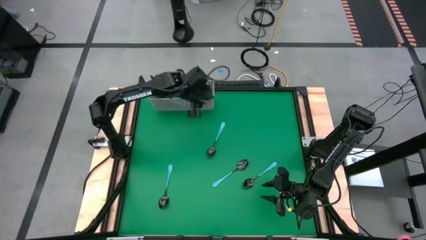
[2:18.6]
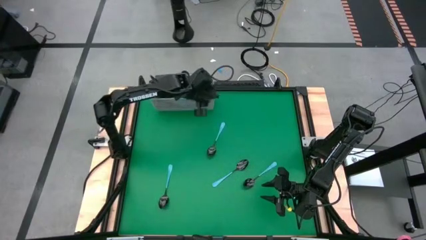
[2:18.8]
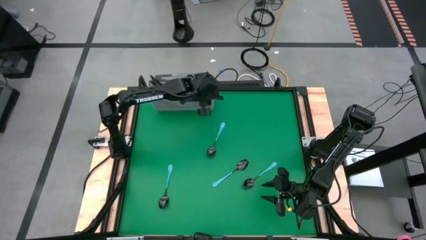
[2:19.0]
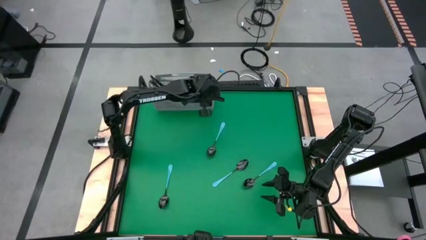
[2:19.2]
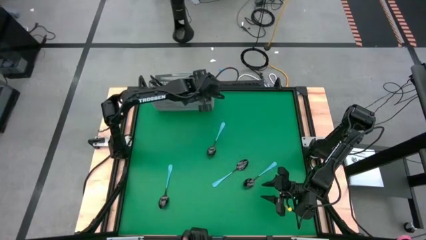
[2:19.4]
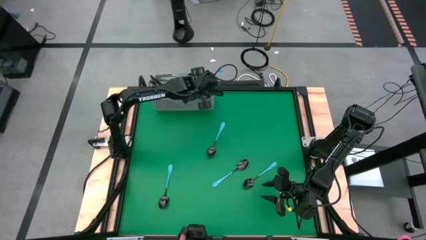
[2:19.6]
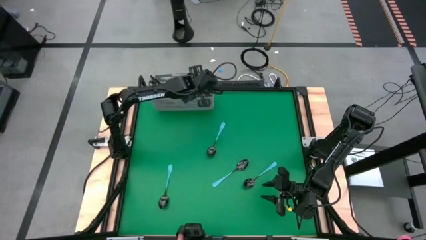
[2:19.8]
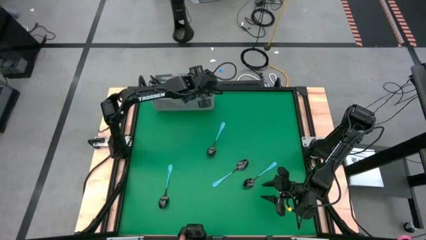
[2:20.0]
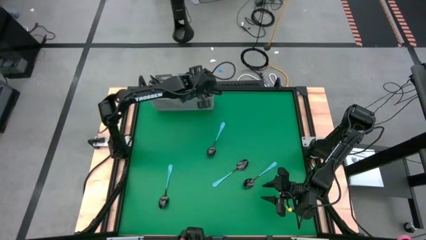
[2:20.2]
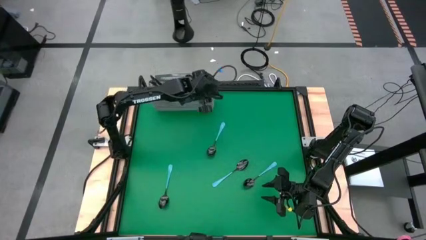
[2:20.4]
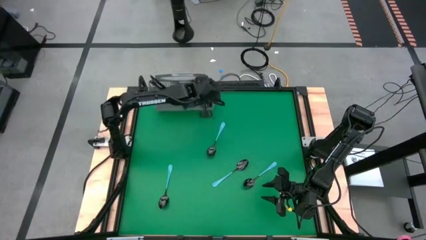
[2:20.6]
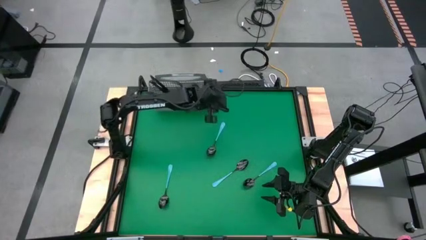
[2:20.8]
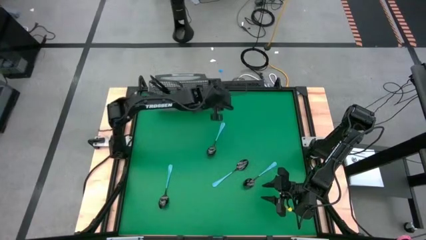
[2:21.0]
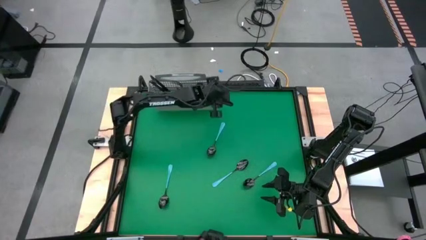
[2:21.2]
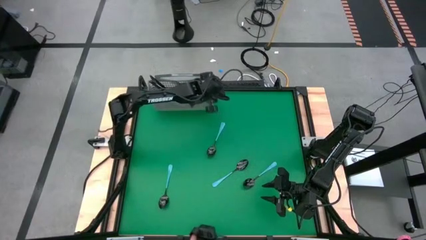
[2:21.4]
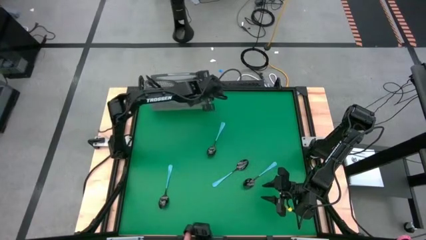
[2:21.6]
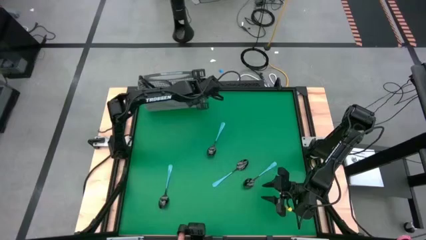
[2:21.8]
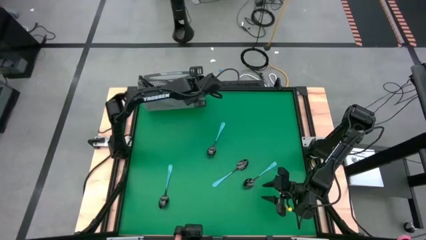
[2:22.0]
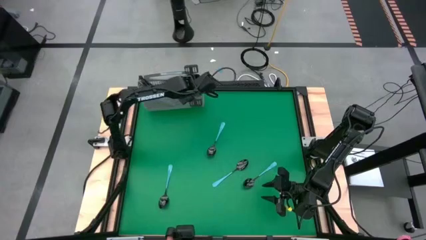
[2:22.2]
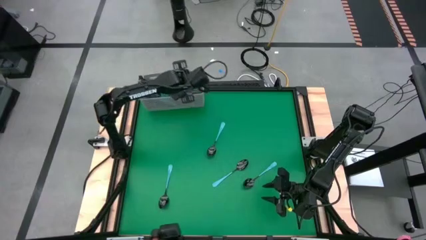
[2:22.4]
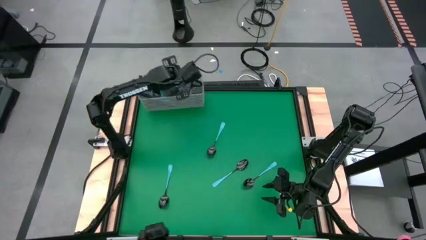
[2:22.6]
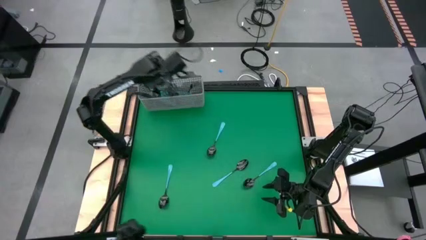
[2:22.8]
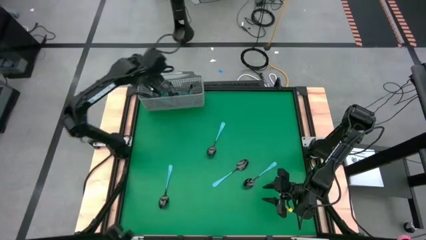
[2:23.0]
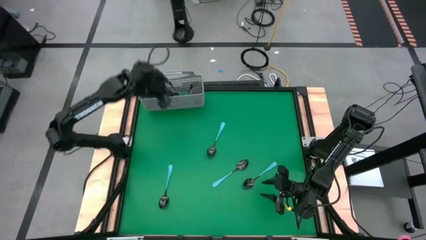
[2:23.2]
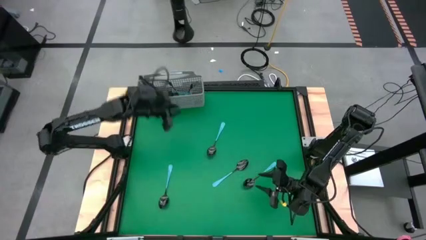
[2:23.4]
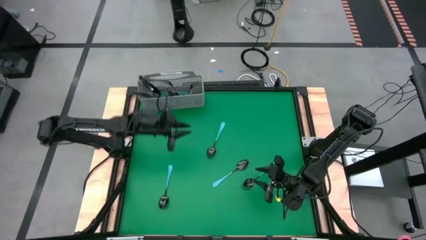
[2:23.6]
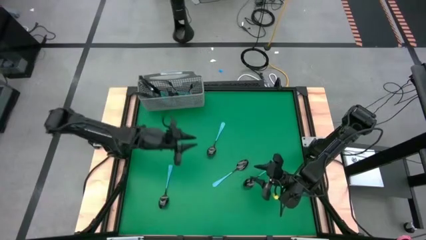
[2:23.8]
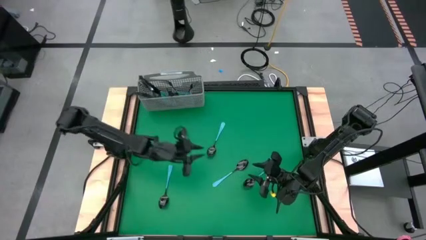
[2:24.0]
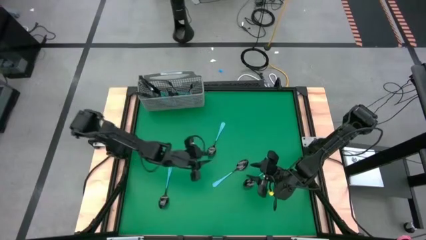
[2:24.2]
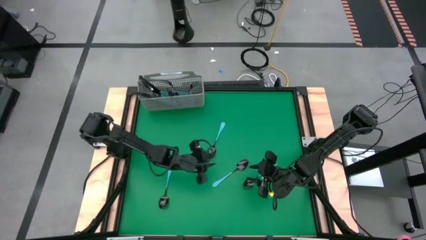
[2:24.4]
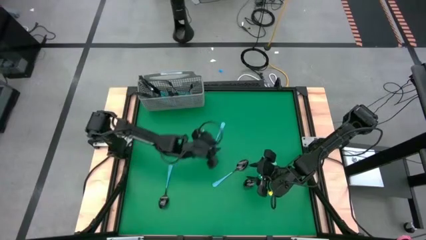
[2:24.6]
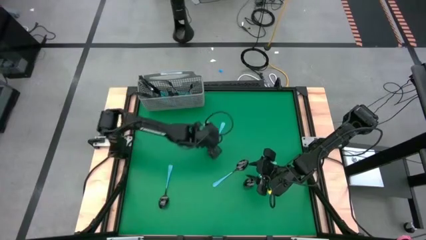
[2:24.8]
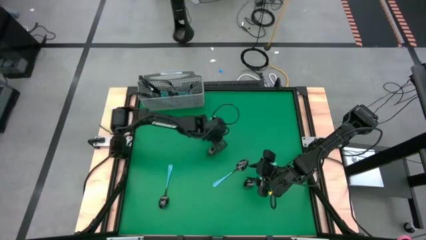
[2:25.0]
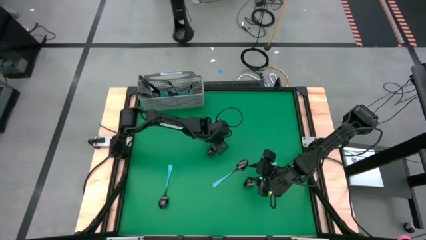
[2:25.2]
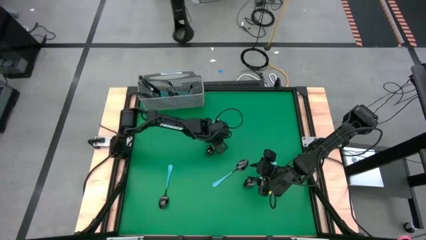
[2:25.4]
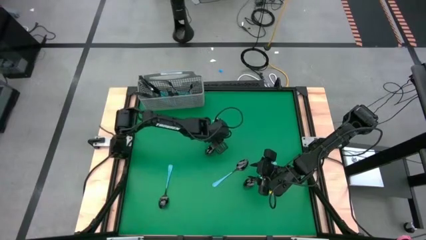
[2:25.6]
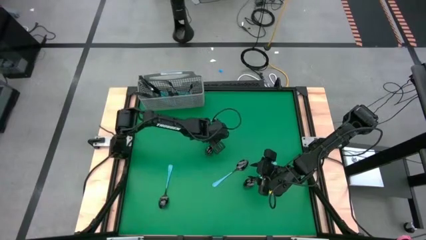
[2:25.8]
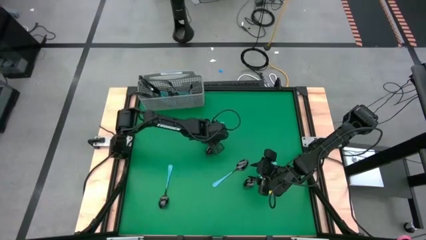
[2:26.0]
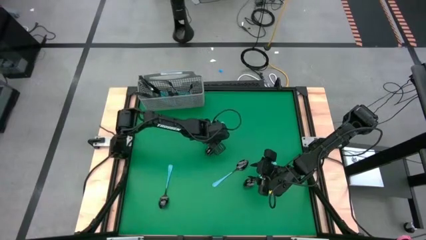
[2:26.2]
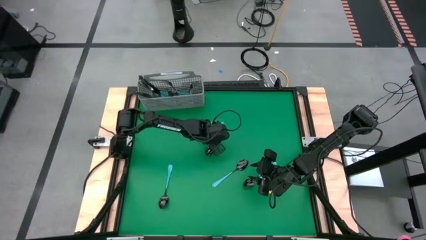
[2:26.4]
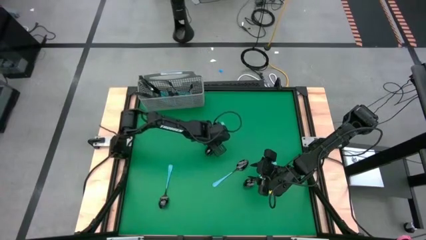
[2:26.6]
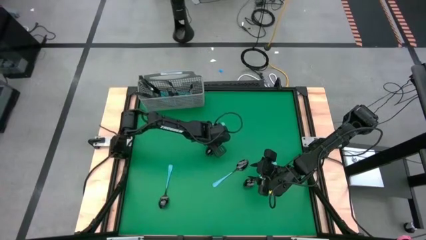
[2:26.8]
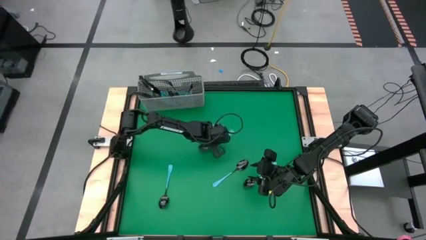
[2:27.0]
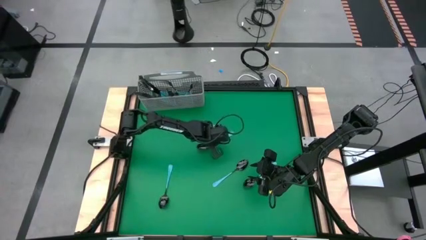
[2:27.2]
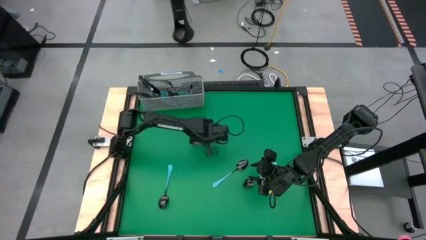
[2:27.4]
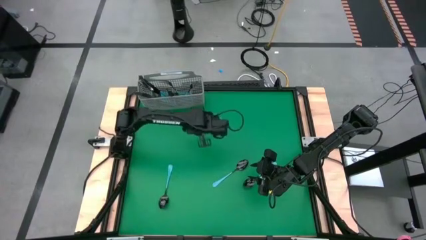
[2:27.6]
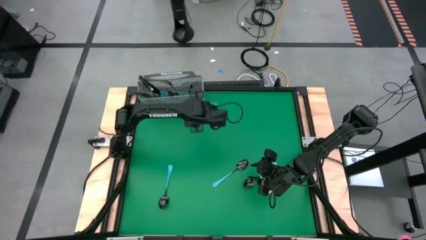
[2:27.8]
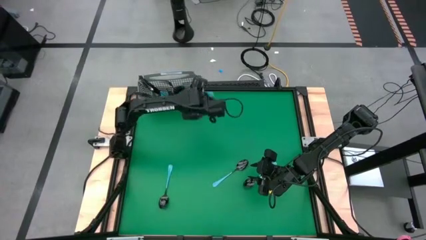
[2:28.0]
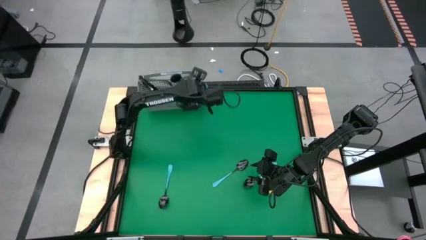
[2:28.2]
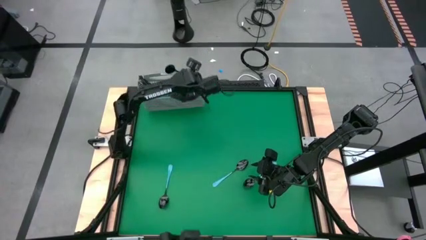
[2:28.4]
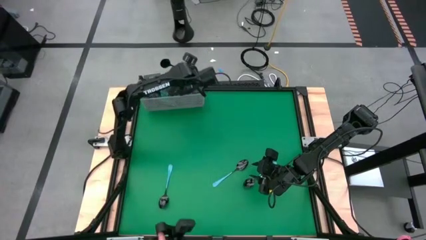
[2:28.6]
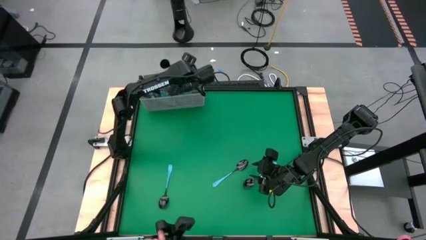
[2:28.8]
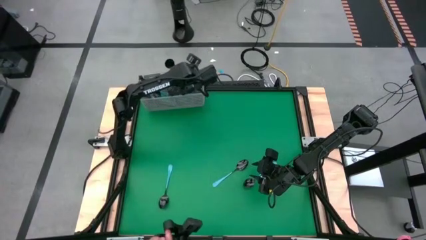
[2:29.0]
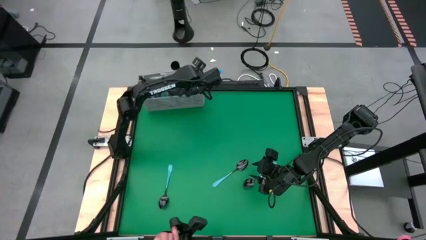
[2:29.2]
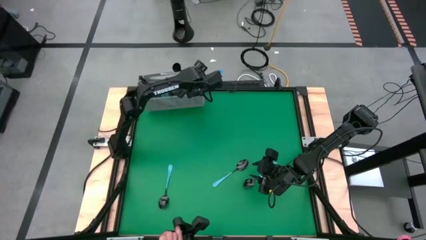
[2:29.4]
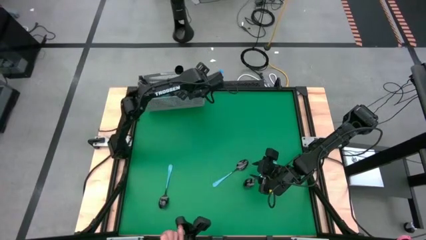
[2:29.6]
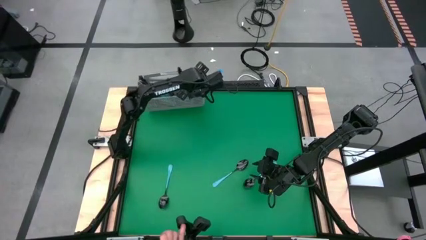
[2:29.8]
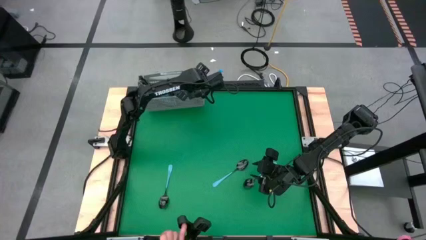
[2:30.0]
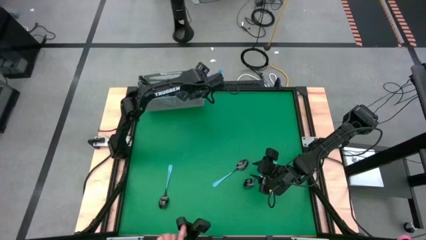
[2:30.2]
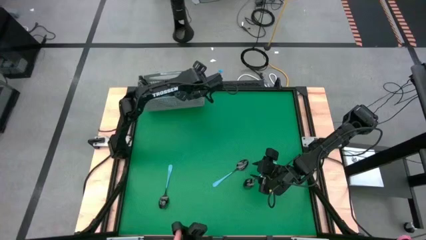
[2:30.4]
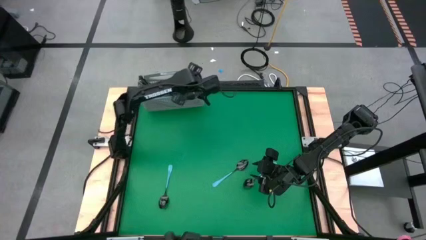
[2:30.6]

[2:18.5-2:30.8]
Task: Sort silverware
Put the spoon into the silverware rack

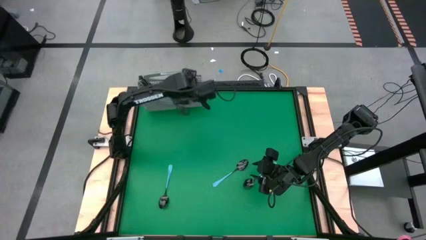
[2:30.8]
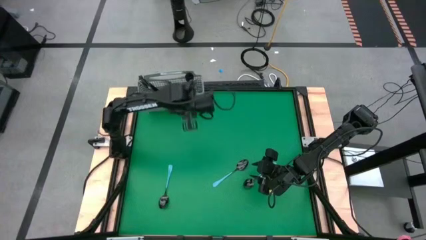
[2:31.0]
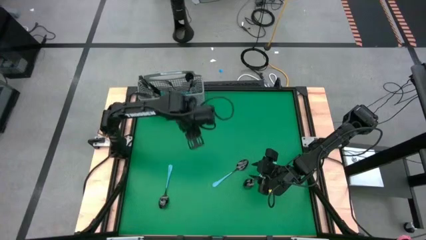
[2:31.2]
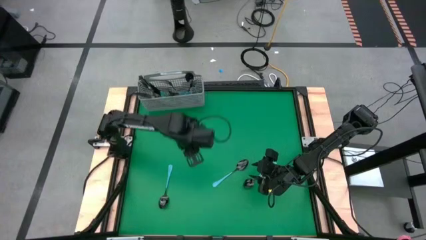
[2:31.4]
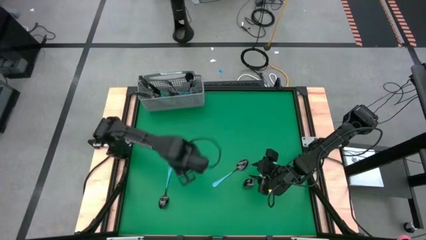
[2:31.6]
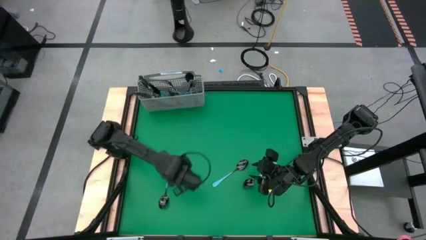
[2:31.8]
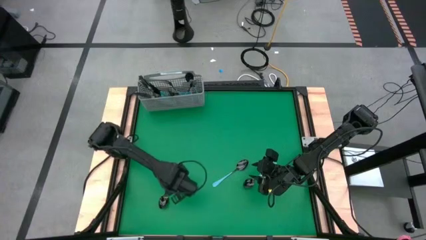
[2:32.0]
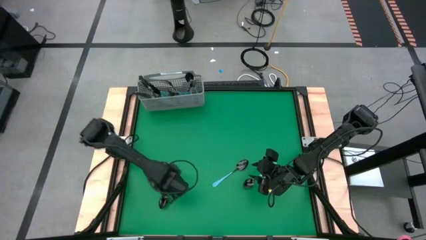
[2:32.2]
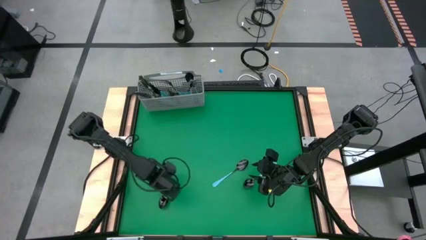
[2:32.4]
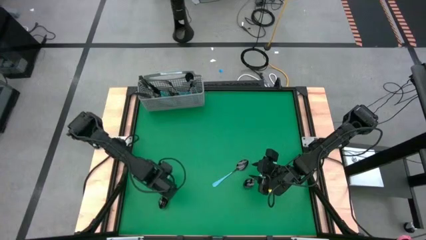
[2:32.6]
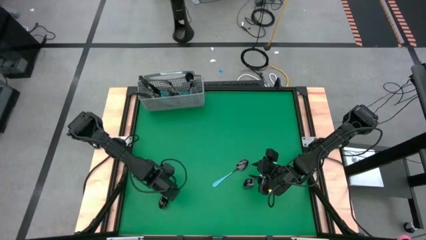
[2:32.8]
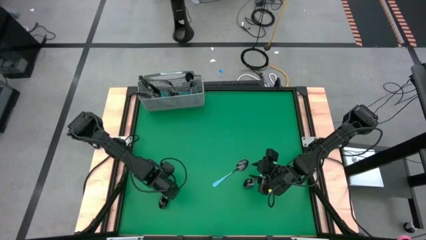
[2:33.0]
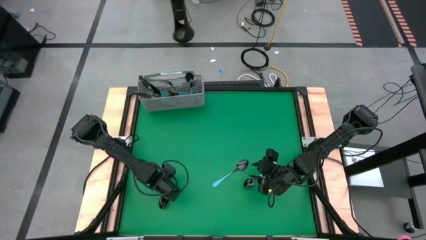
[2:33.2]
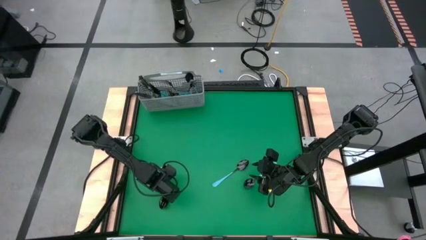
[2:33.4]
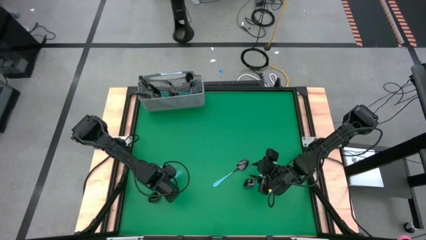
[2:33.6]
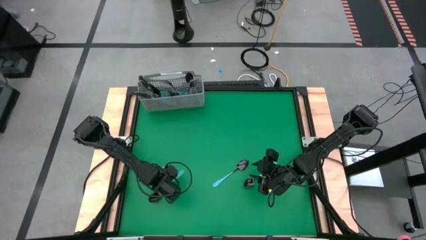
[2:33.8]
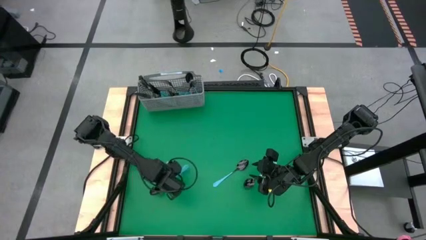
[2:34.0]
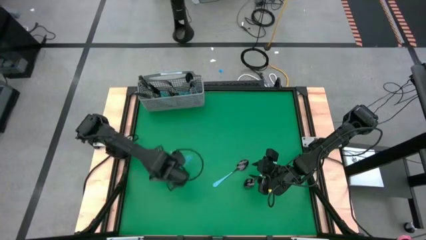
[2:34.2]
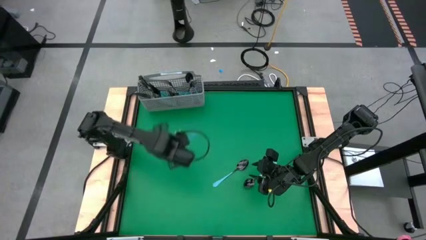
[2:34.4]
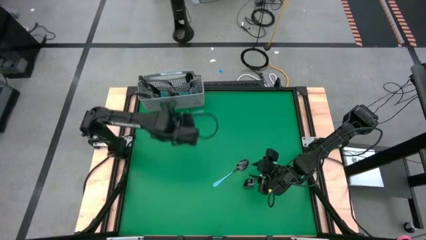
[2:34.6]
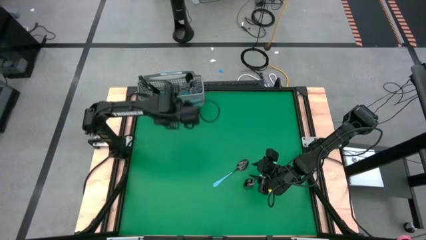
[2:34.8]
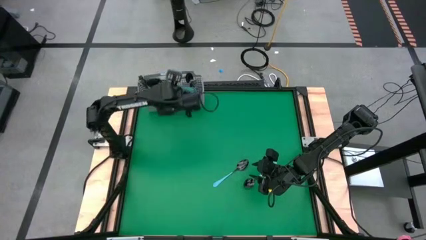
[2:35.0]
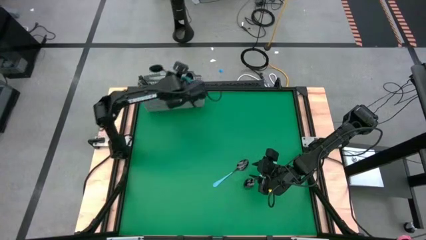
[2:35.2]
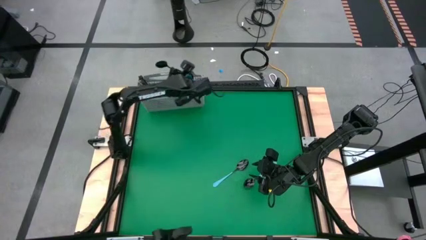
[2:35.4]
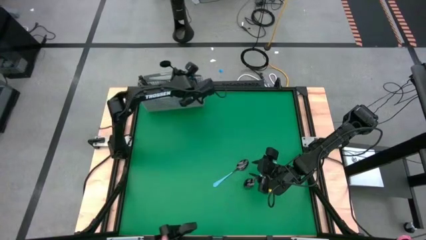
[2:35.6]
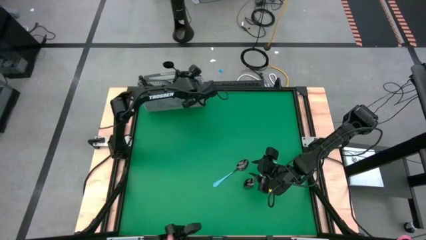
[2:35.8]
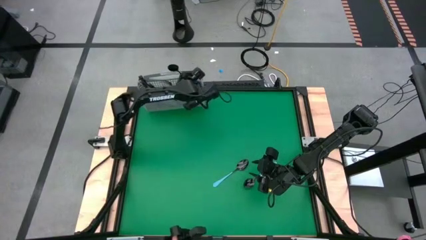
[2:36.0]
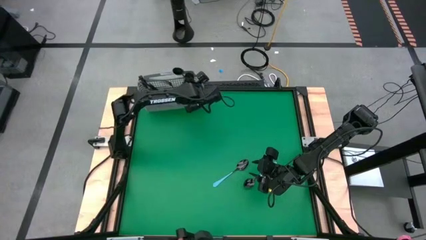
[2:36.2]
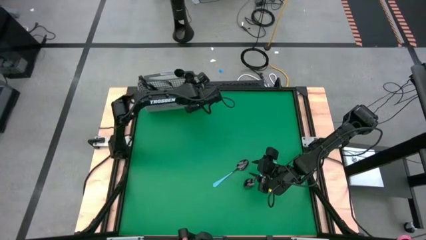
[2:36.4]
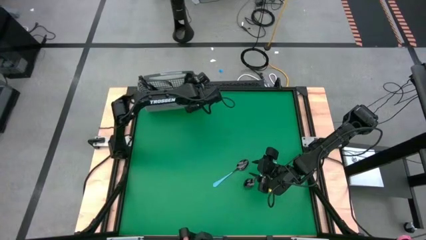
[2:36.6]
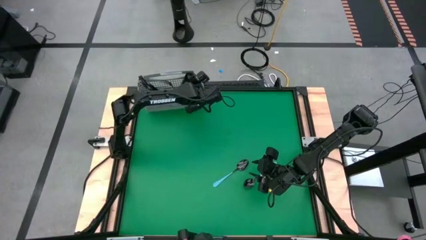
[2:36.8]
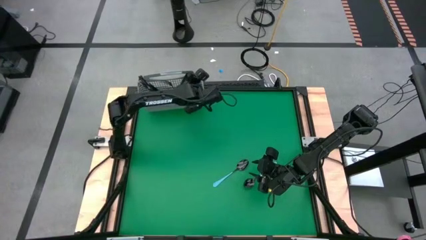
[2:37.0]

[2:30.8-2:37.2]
Put the spoon into the silverware rack
